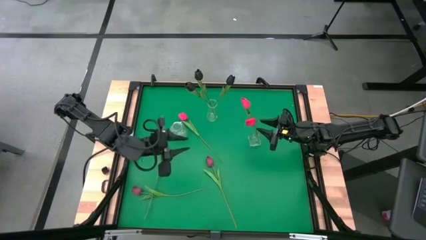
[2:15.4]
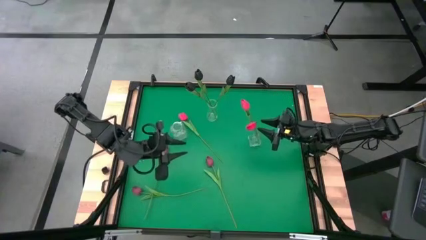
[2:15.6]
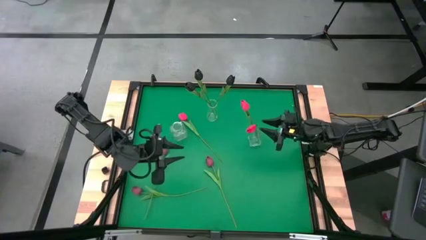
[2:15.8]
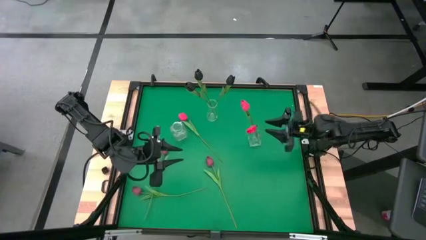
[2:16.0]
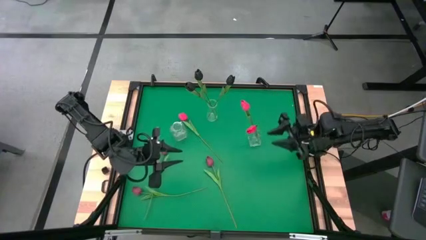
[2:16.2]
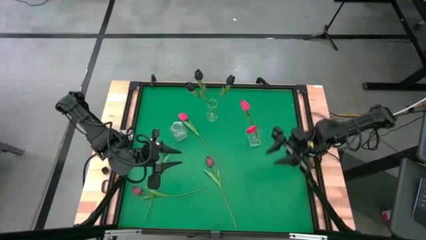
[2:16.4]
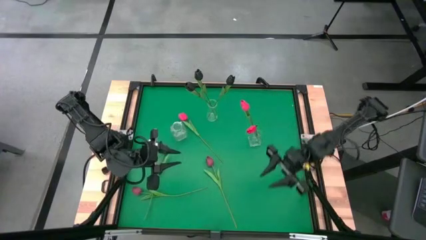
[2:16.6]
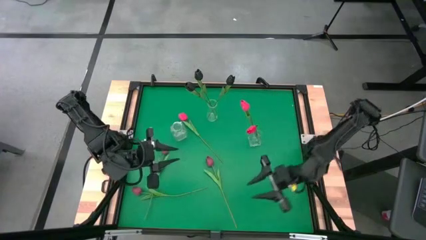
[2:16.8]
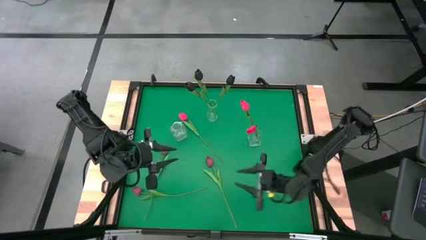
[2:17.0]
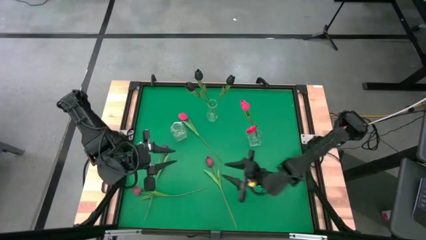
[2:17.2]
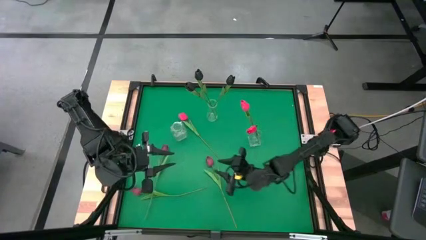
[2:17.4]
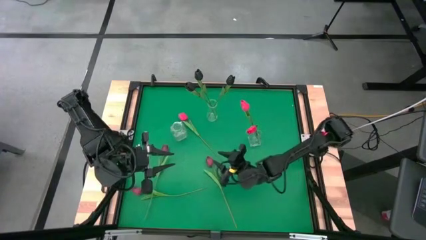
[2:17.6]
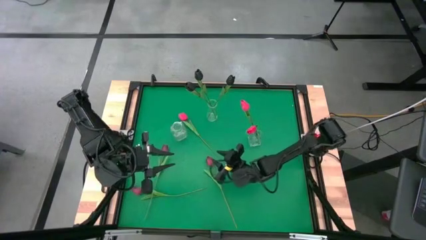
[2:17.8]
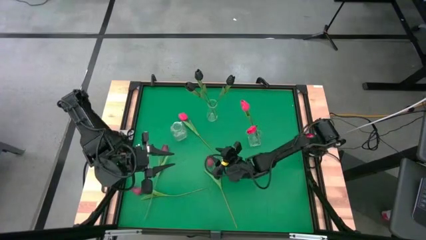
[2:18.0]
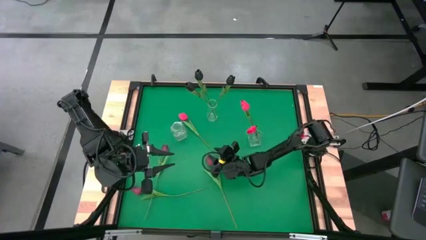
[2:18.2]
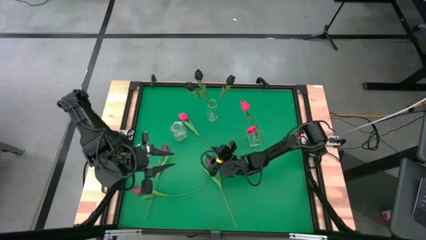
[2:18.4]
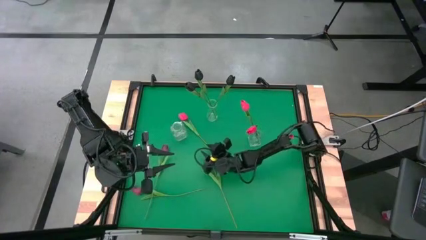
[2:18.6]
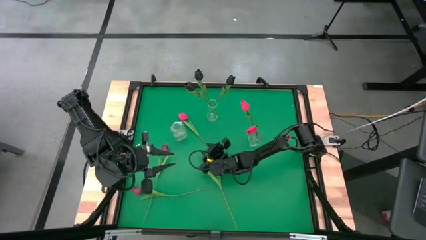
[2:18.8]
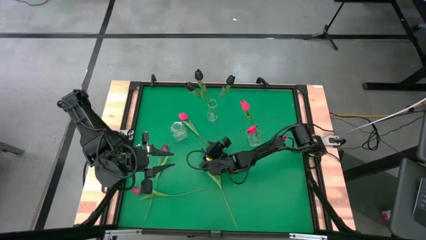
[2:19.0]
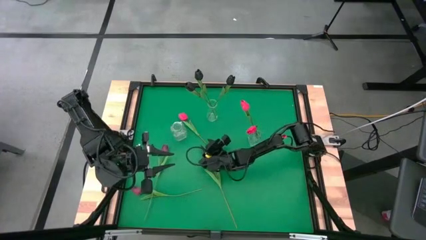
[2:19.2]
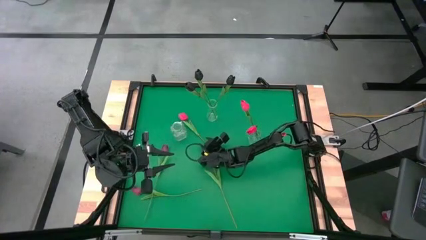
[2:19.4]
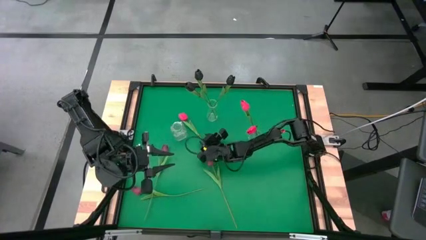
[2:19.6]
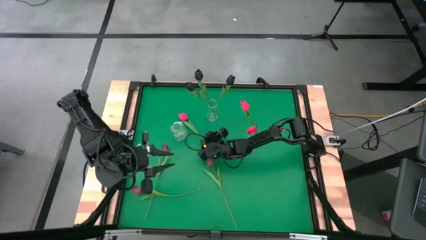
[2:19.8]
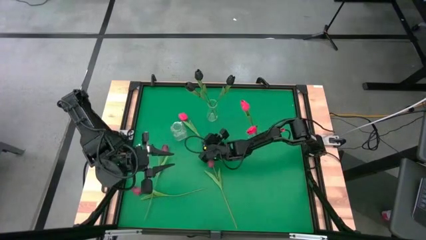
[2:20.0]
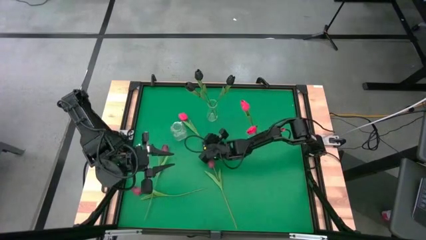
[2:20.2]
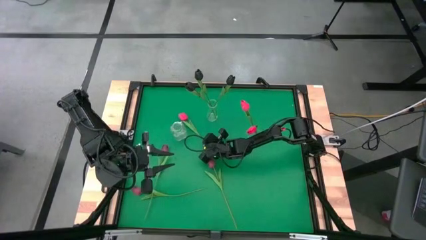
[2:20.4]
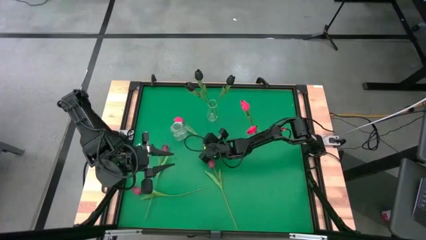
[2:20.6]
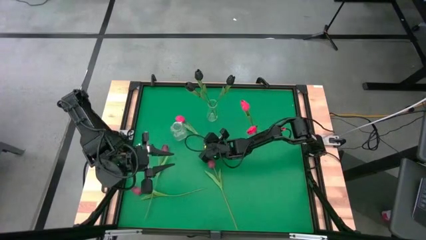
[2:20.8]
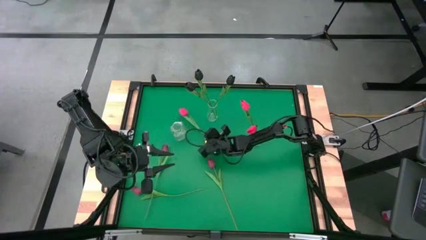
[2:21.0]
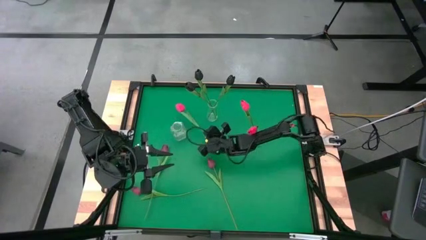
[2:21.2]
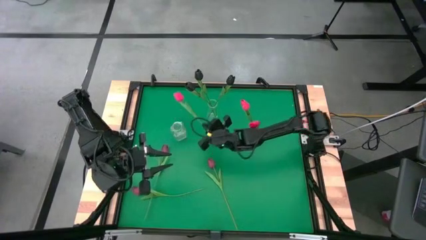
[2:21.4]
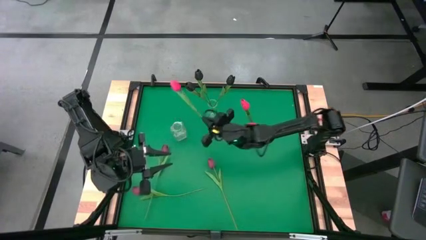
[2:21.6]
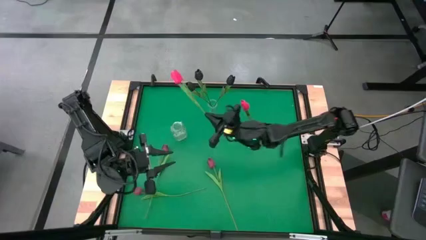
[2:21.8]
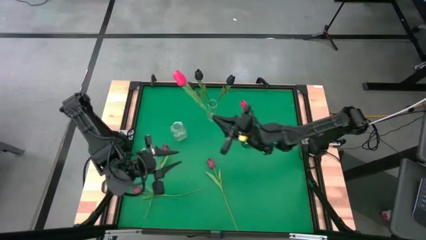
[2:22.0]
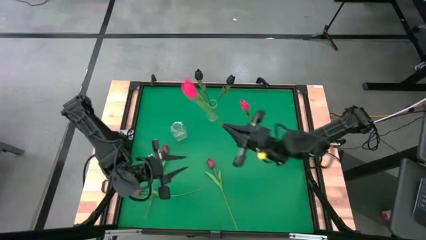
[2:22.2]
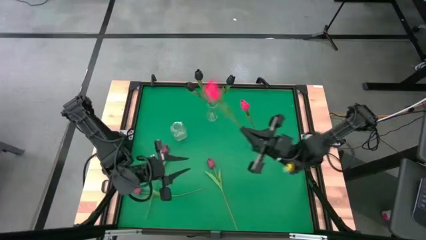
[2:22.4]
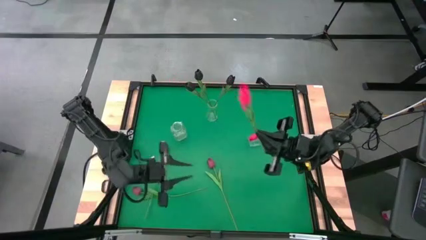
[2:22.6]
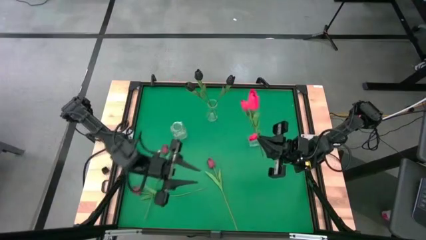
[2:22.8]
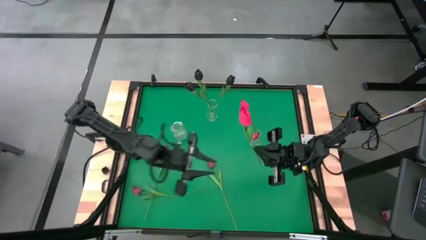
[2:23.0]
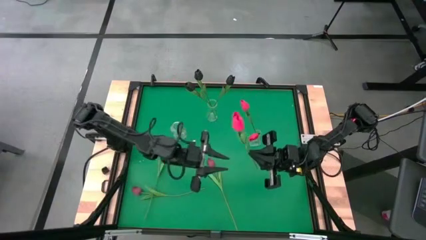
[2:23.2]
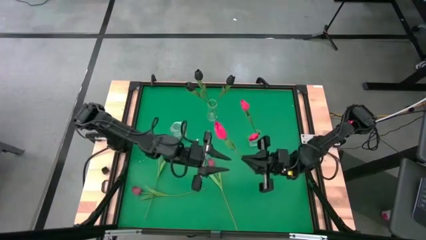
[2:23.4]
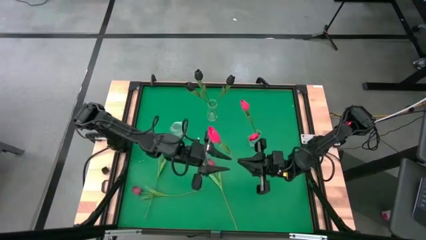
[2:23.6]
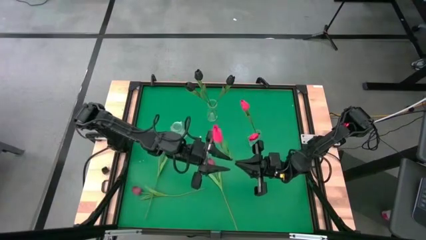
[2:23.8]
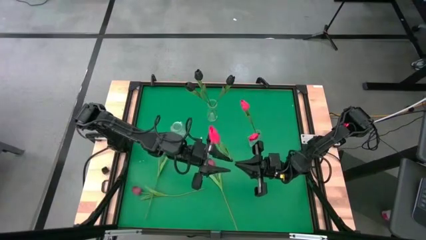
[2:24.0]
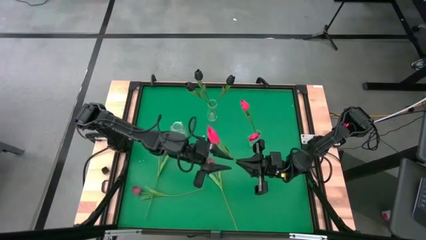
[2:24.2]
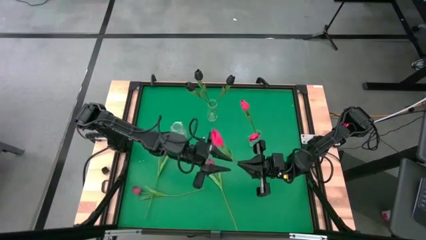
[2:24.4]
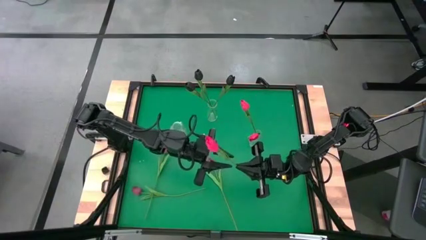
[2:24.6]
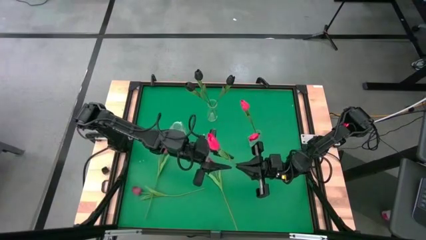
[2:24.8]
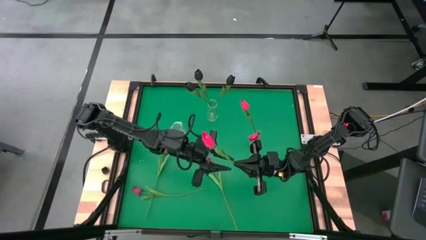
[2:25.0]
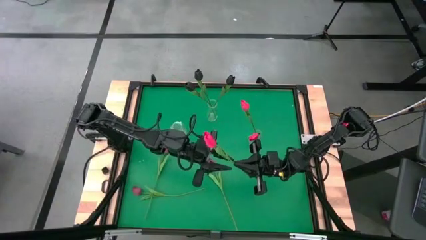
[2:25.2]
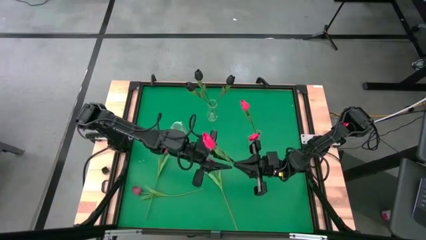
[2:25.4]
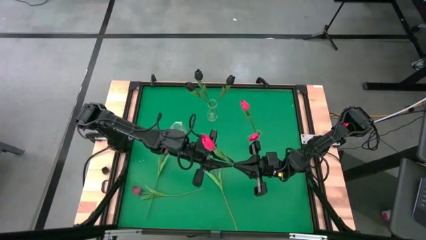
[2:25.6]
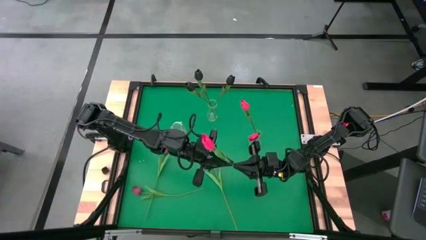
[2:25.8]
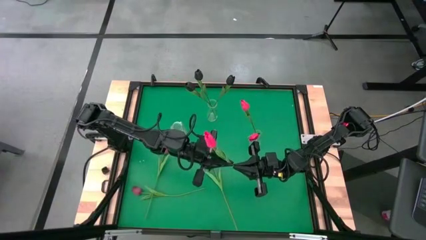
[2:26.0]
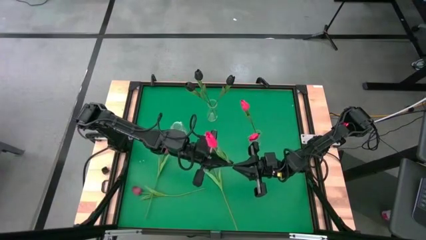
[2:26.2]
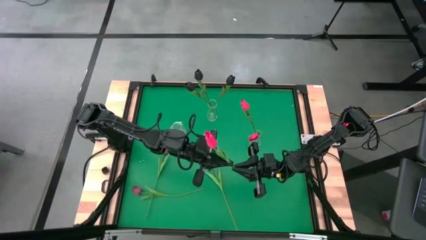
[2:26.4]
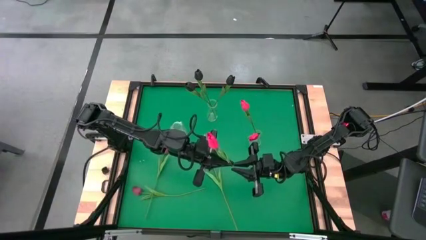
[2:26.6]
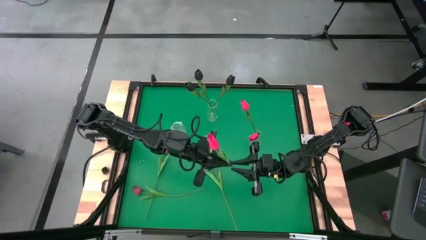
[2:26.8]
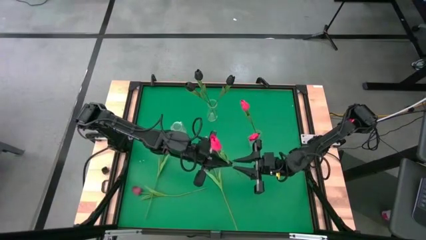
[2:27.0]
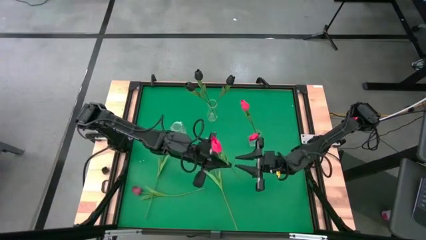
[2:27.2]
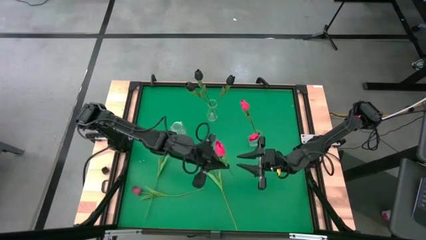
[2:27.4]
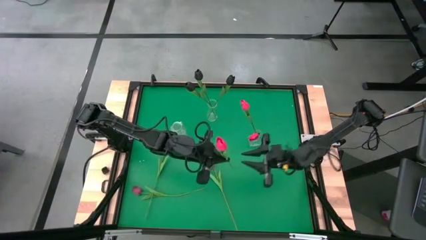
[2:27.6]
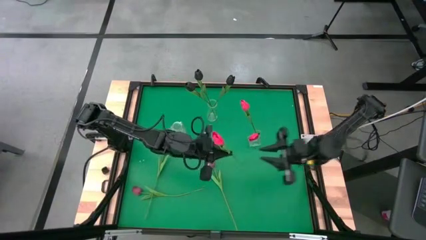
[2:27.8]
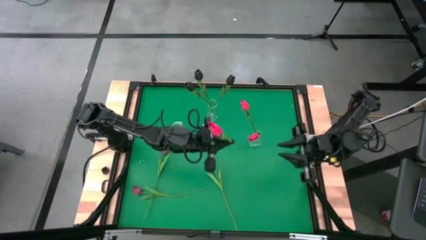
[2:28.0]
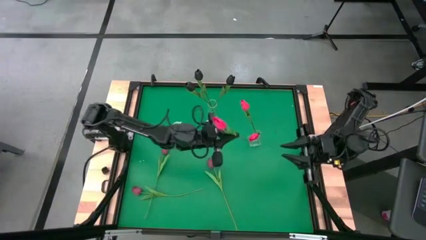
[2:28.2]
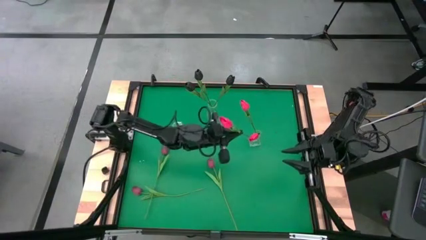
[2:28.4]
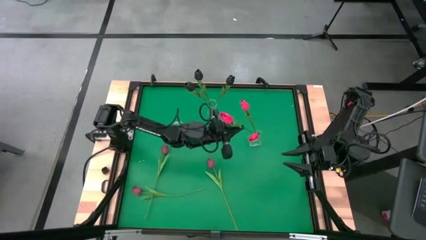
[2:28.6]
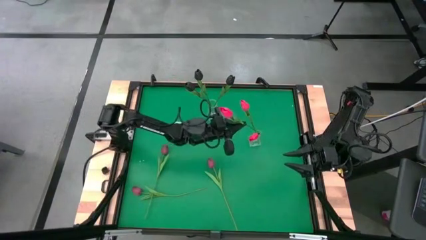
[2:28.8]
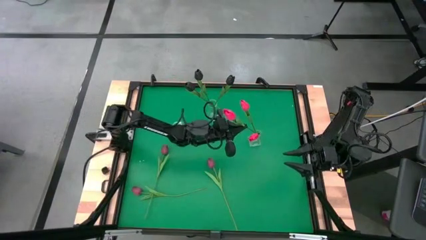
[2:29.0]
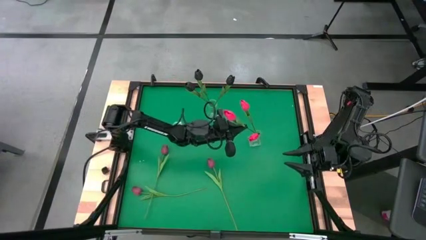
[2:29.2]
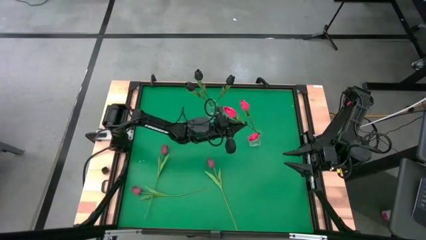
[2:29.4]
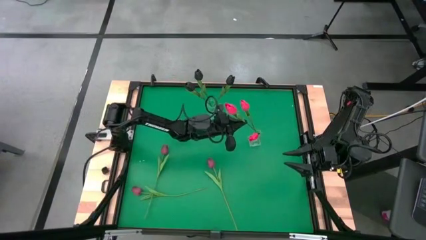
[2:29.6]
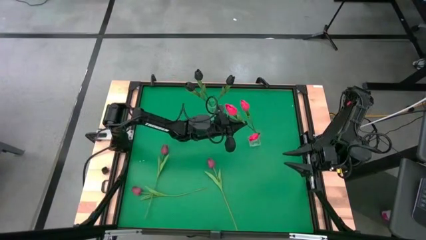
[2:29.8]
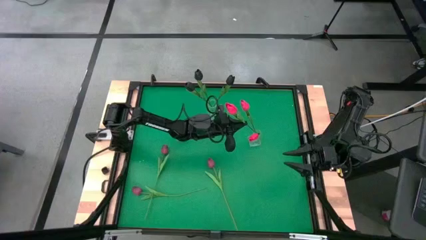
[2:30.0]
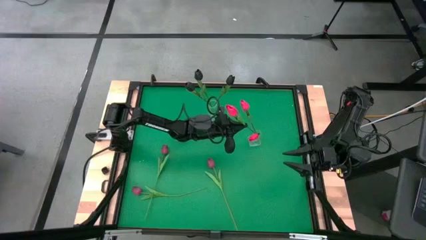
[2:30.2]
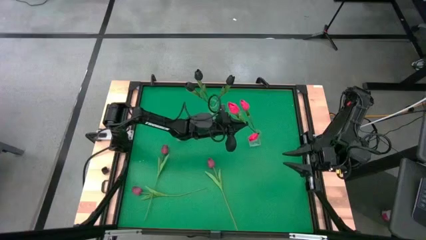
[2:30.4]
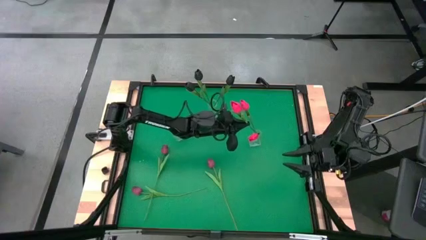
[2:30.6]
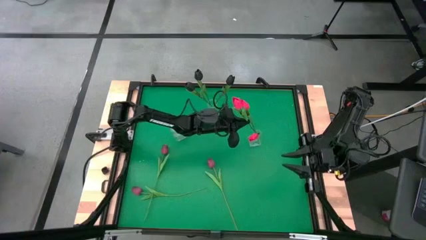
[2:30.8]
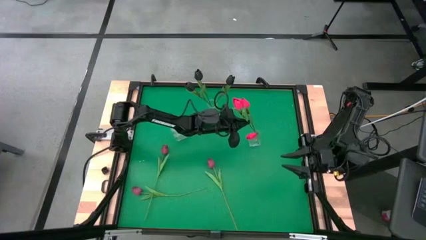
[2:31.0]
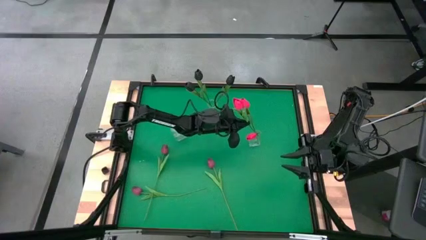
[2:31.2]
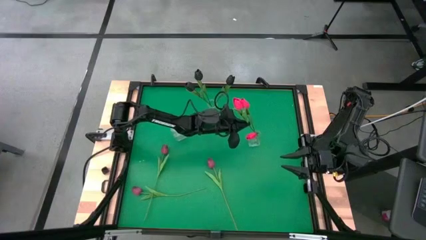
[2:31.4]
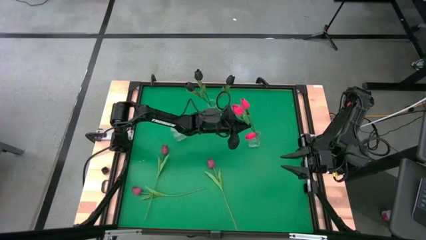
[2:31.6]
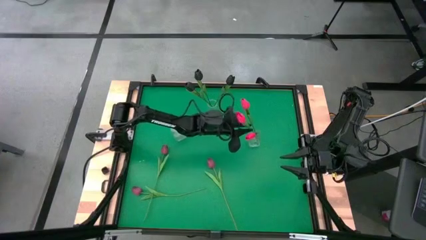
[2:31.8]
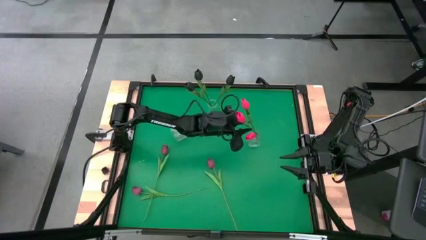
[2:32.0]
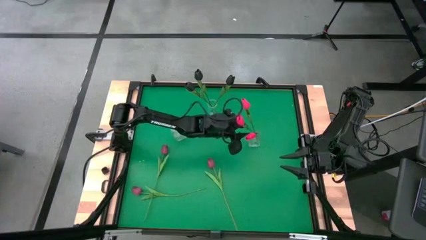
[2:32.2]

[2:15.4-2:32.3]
Task: Sort flowers into vase by color
Put the pink tulip into the bottom right transparent vase
